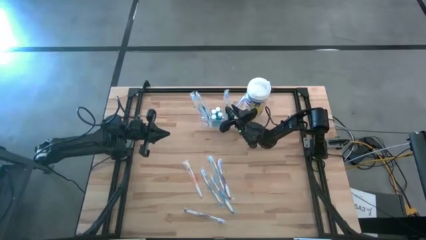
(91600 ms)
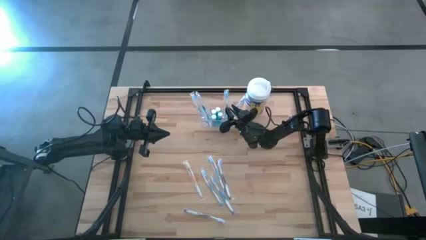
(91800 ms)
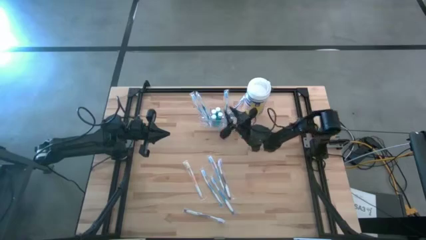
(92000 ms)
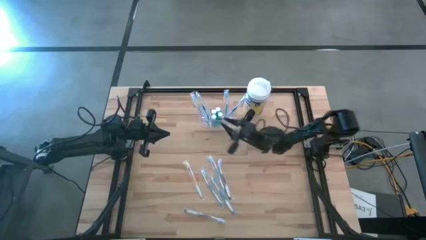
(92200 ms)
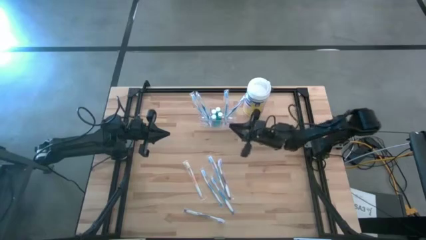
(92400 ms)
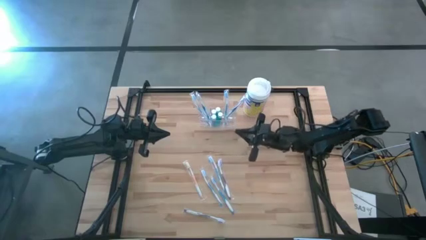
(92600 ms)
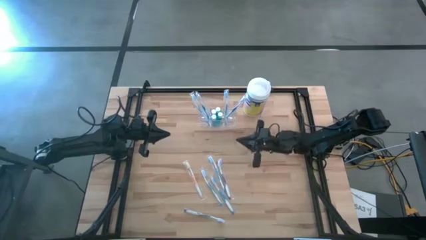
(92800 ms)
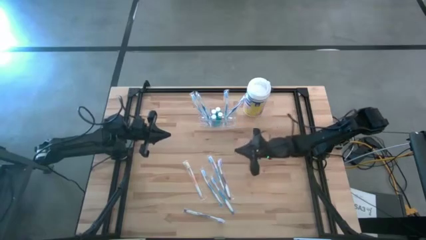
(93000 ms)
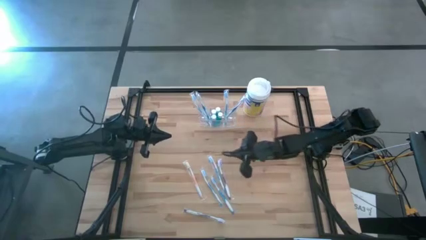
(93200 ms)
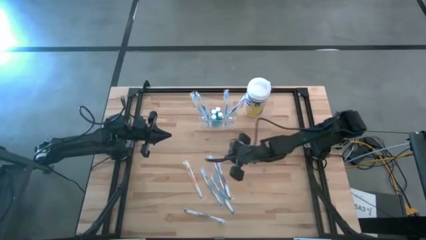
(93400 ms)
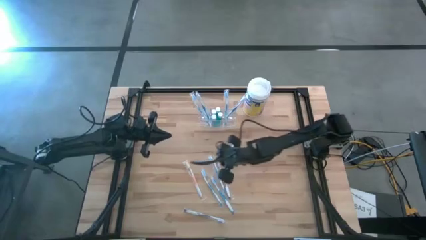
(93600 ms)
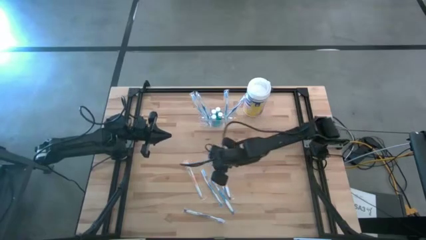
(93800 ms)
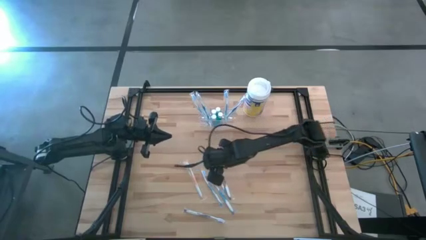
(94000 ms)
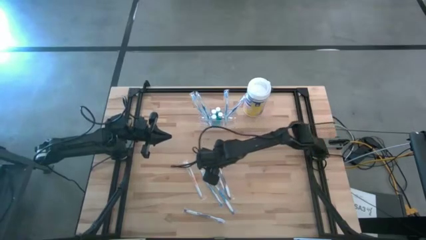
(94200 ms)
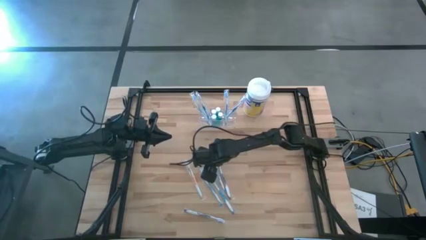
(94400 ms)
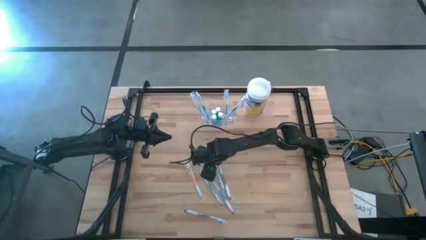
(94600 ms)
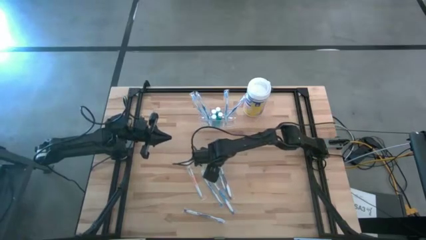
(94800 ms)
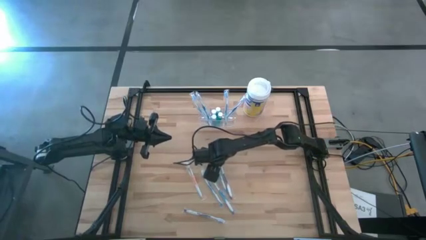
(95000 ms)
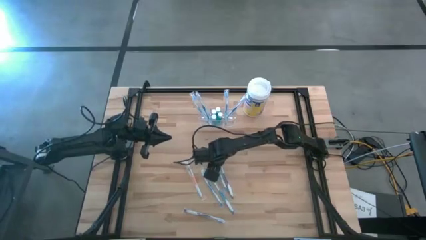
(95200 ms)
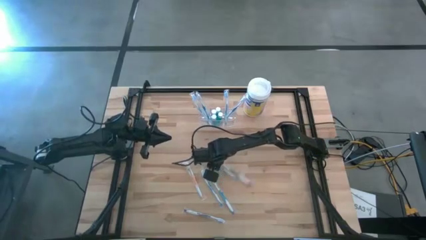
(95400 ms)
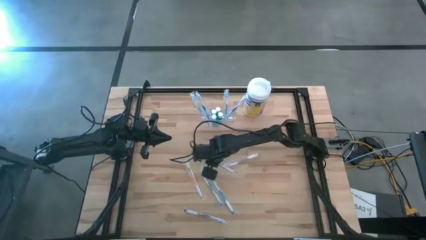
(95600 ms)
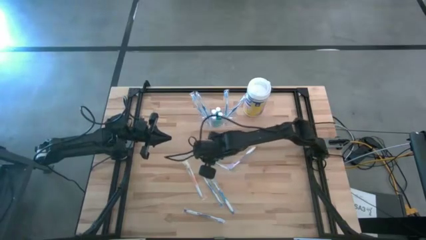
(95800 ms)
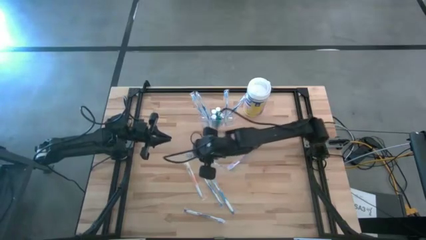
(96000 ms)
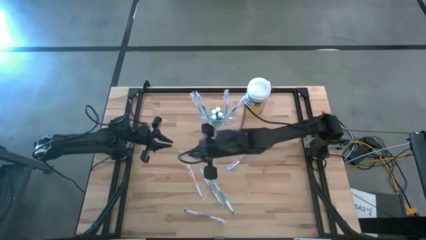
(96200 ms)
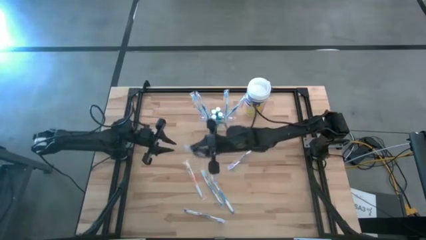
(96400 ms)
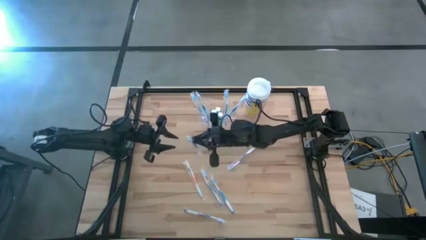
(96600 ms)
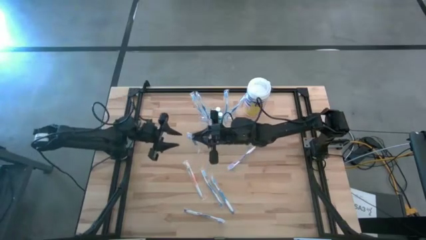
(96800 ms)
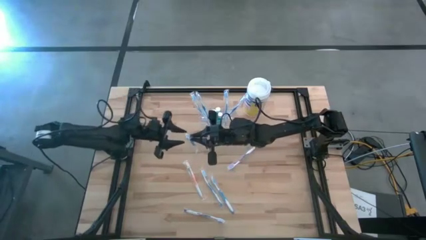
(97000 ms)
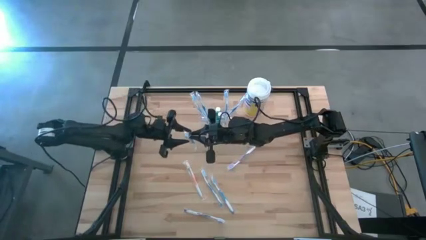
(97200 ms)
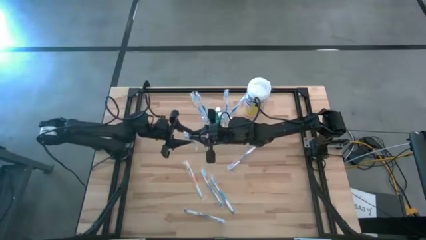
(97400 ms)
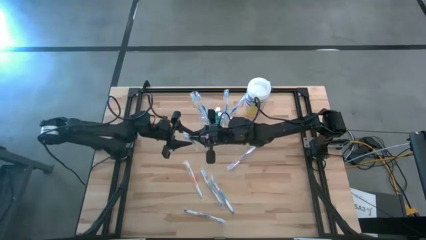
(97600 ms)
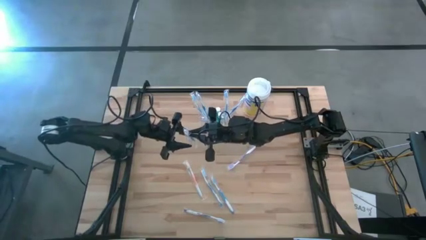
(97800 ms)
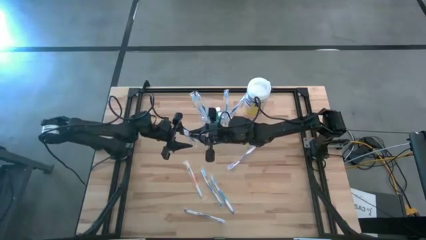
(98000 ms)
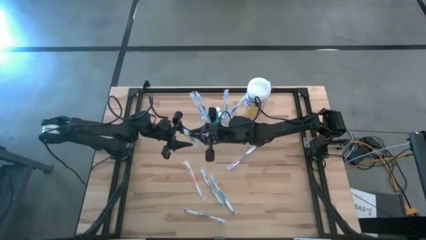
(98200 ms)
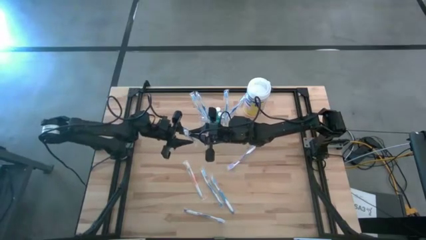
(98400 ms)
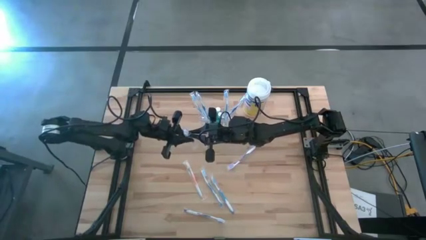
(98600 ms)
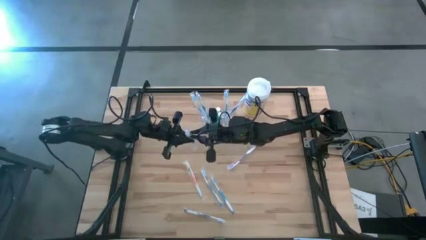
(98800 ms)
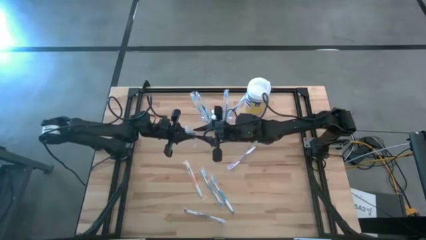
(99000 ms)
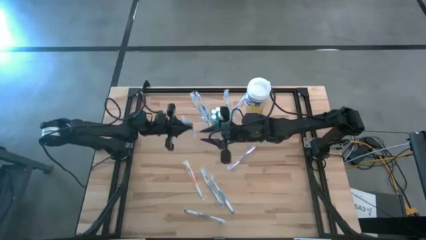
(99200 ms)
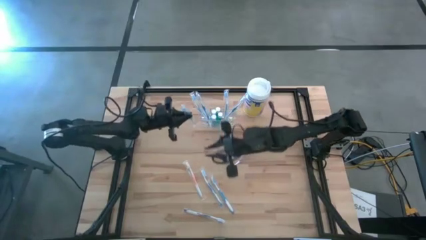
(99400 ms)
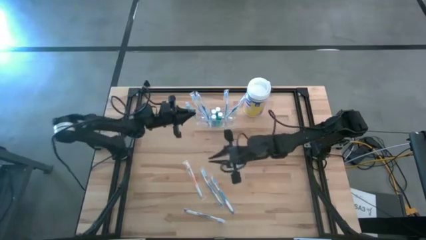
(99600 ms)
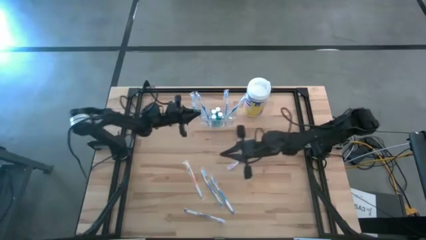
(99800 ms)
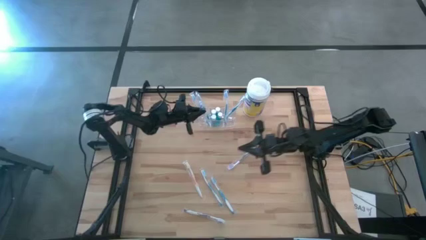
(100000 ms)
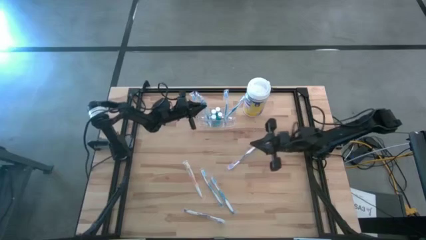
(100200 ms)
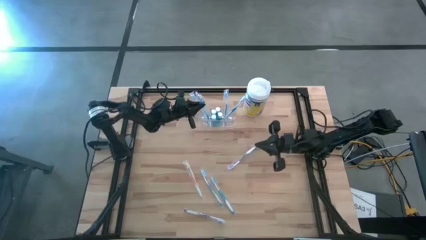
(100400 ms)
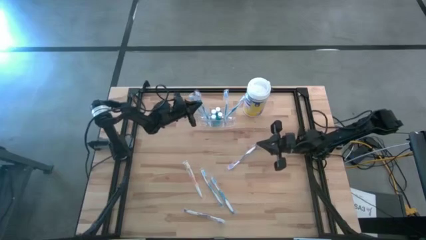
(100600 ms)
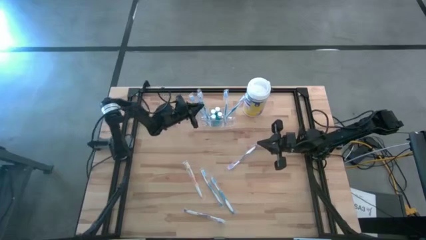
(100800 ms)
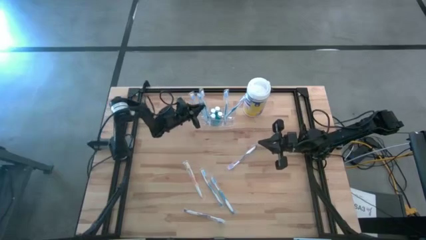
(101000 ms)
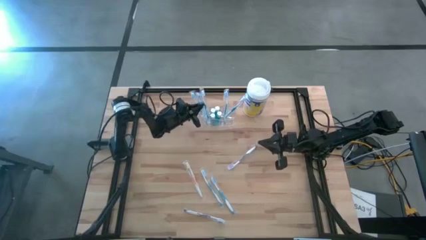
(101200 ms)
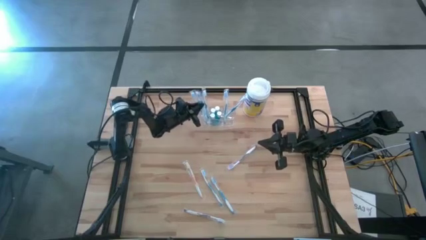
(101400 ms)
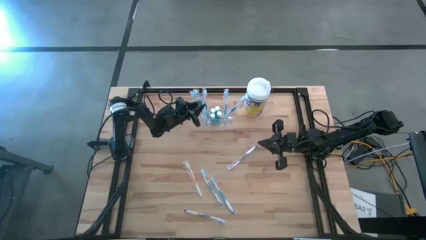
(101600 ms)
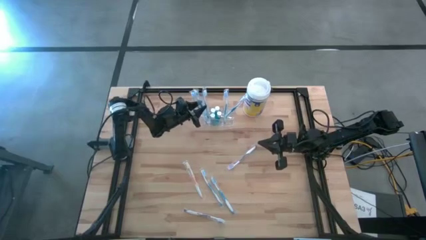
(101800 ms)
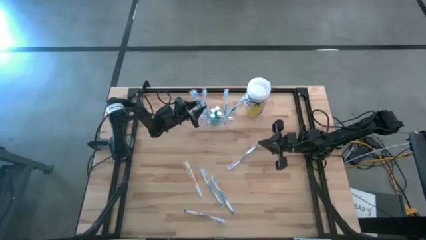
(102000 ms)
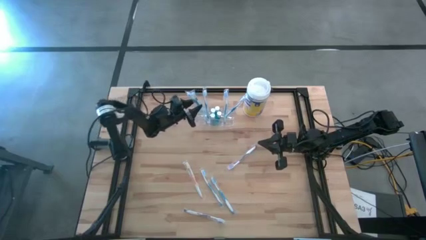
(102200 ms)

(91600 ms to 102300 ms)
Task: Pick & Place toothbrushing station
Put the blue toothbrush into the transparent toothbrush holder

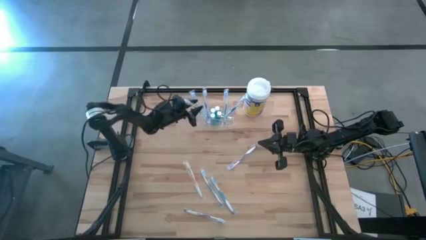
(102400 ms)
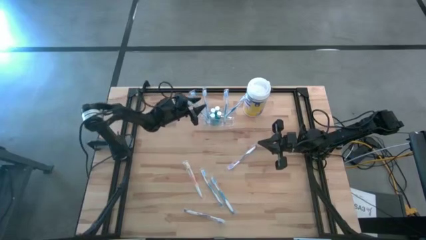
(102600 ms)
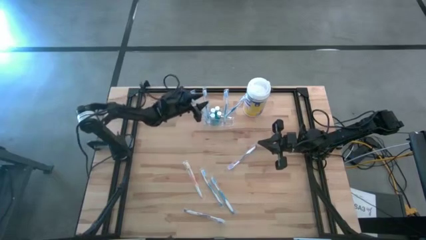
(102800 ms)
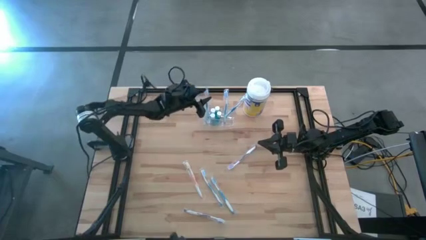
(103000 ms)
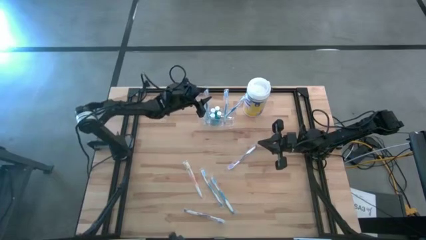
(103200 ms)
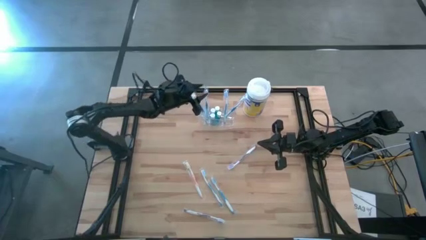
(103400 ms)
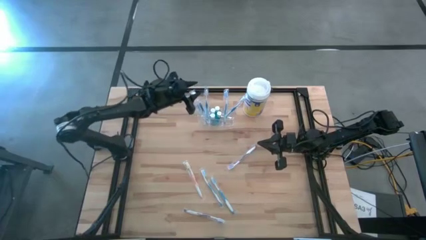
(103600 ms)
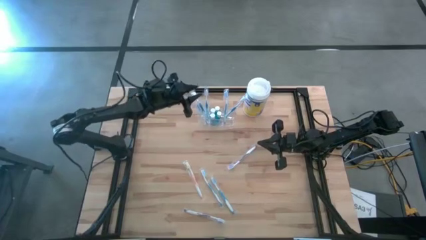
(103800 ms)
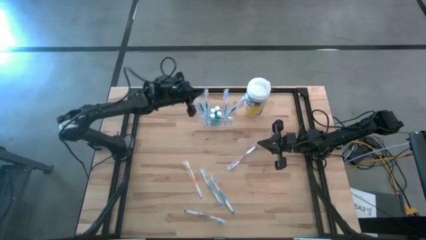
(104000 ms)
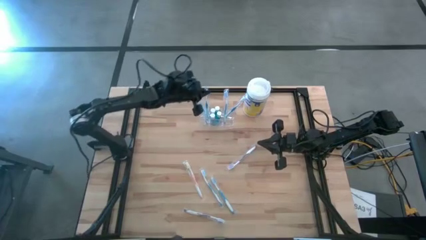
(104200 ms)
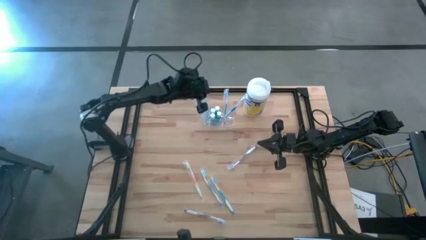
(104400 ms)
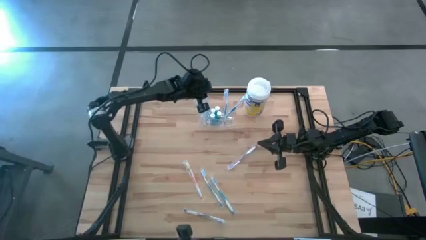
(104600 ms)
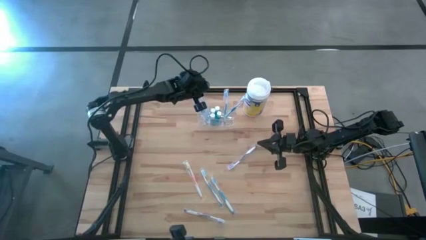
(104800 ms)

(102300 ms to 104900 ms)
Adjust the toothbrush

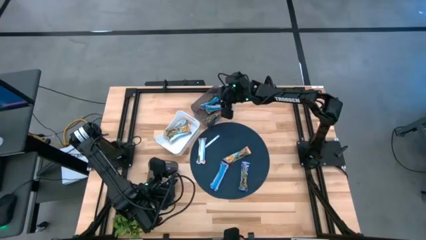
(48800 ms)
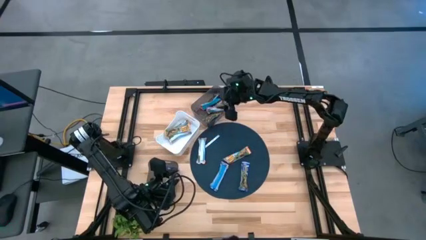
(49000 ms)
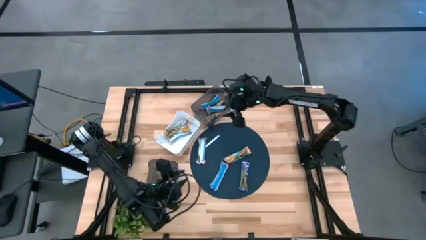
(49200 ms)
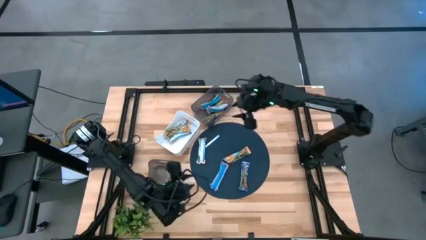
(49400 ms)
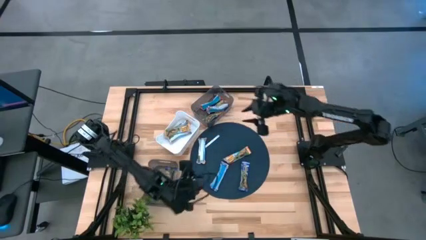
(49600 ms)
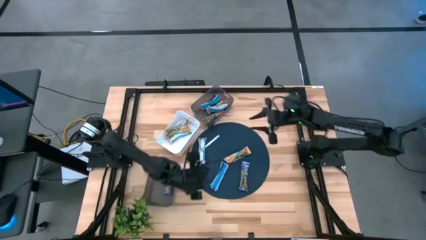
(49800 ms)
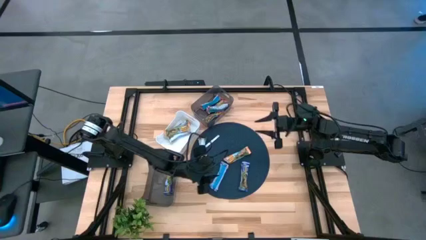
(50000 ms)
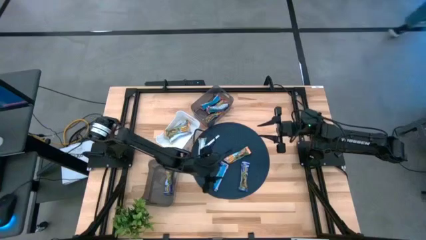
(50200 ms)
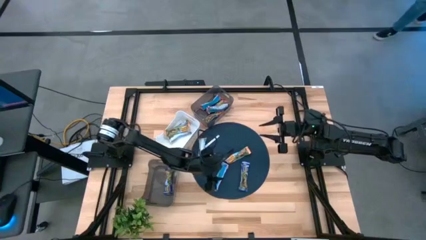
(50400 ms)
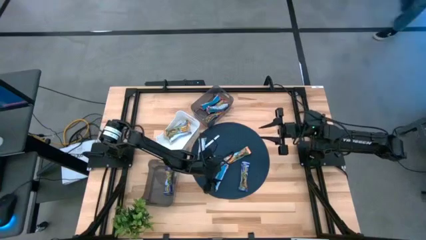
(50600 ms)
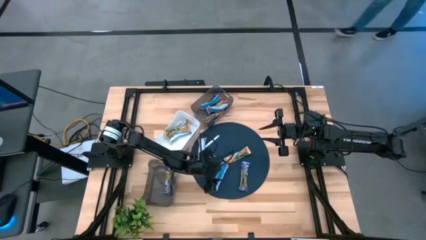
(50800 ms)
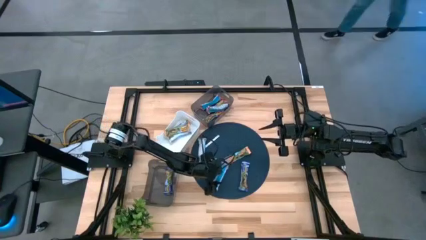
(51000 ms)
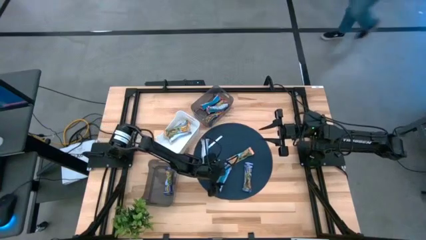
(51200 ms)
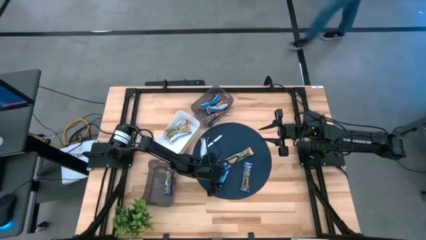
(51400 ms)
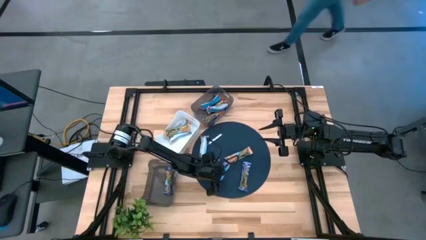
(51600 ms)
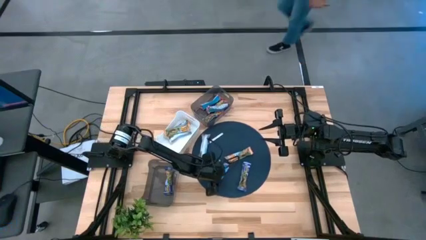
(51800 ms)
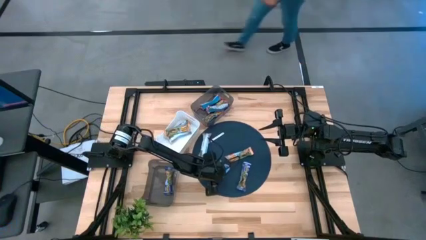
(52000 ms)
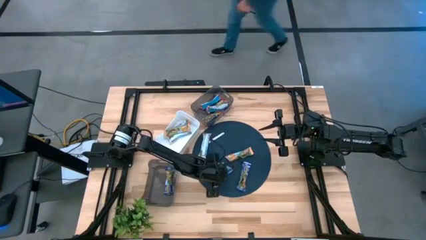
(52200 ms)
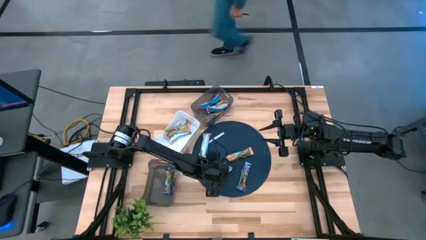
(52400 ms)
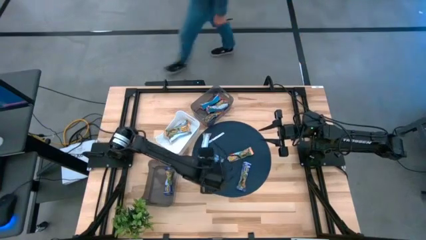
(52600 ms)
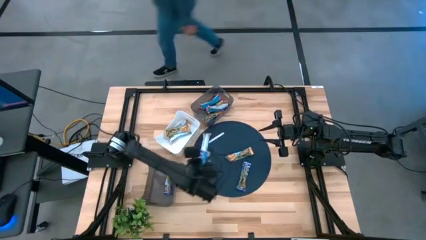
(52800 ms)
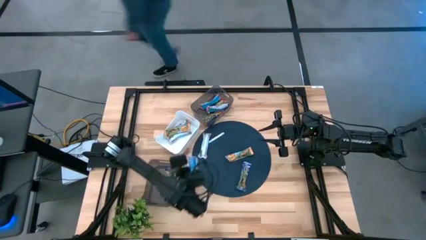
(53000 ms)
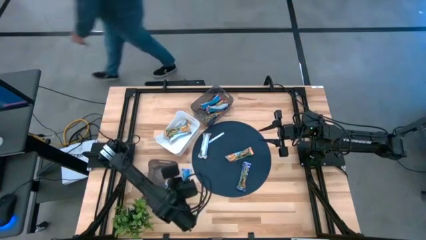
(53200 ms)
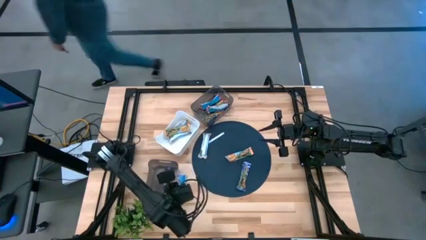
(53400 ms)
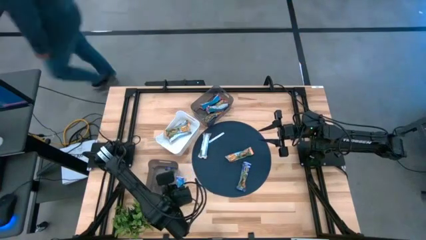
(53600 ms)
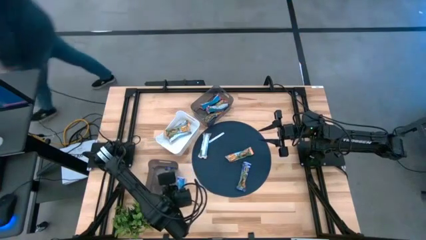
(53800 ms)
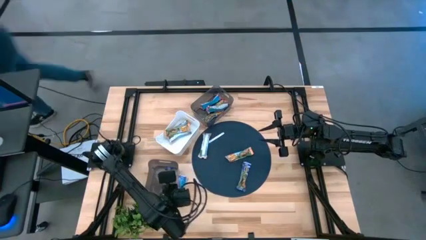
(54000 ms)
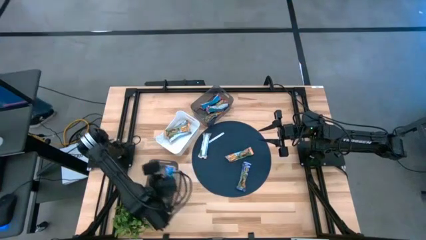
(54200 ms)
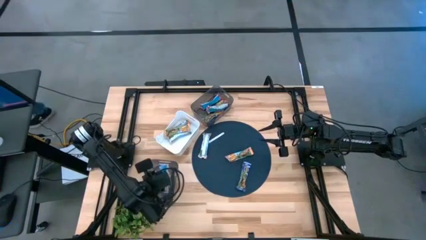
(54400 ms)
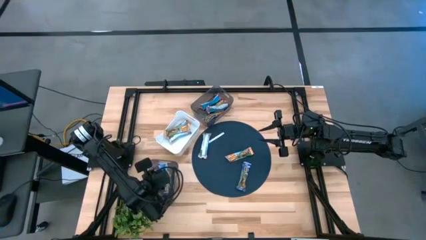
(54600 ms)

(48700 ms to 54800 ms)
Task: Pick and place Granola Bars by type
Put the blue granola bar into the bottom black bin
